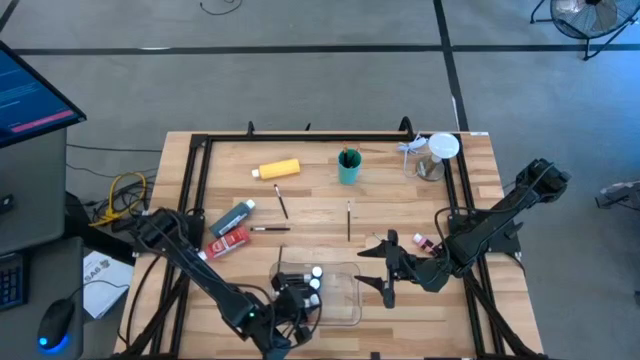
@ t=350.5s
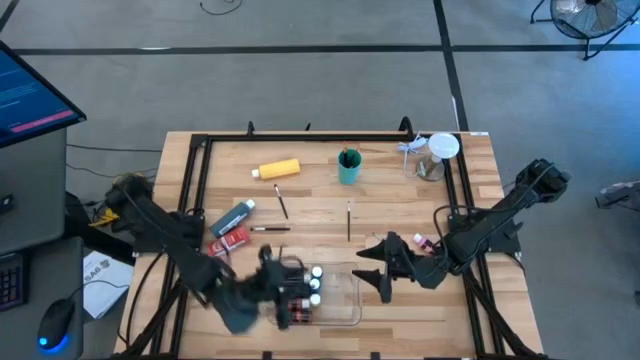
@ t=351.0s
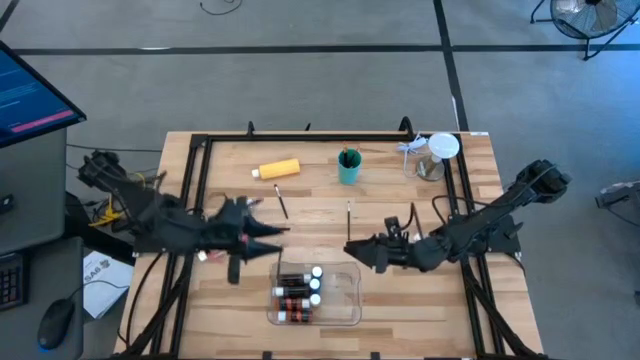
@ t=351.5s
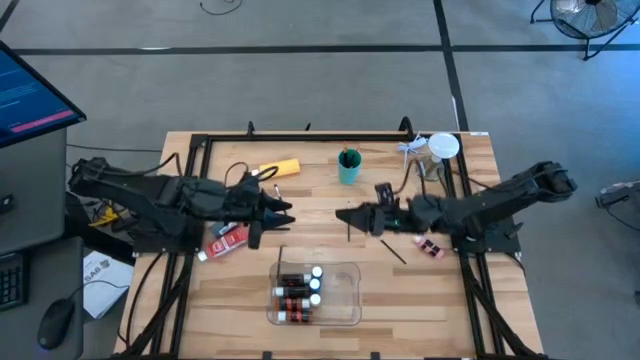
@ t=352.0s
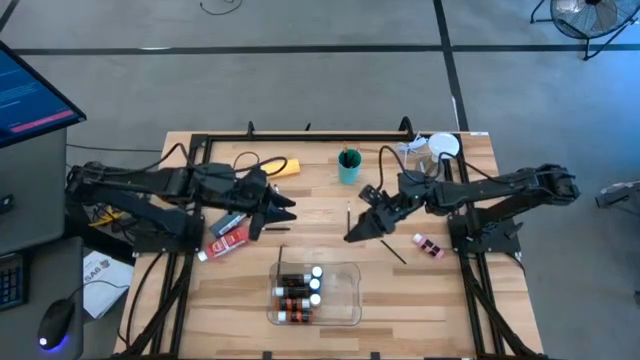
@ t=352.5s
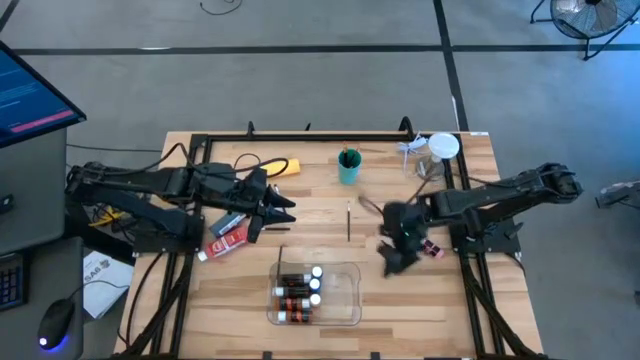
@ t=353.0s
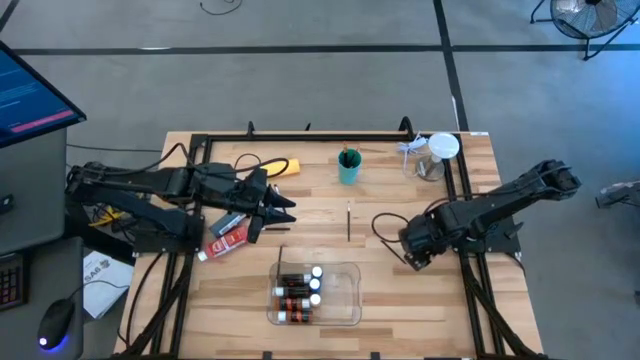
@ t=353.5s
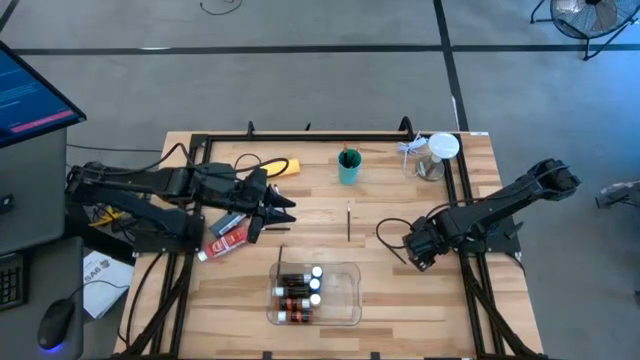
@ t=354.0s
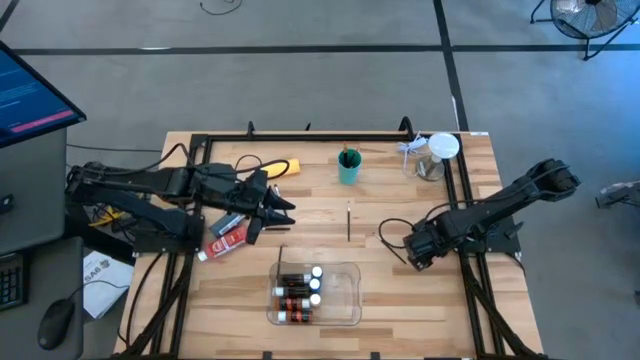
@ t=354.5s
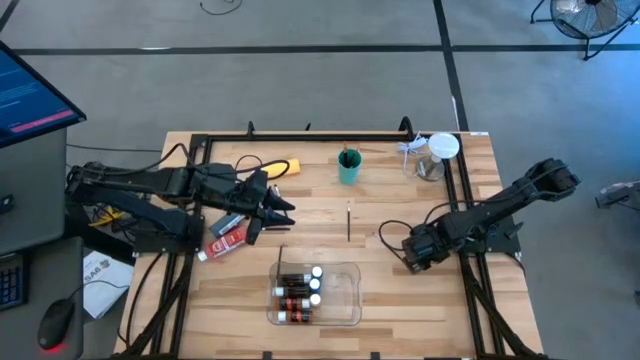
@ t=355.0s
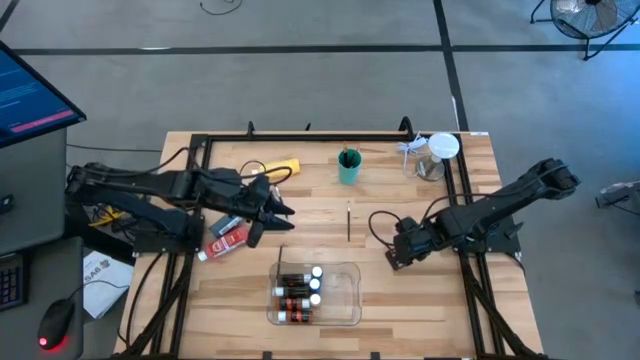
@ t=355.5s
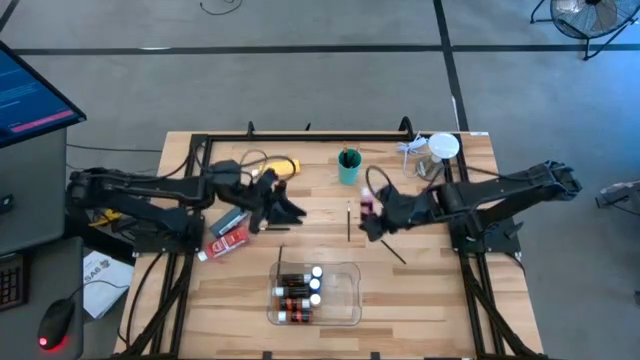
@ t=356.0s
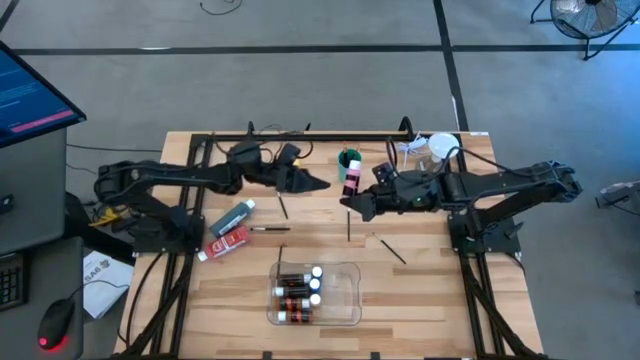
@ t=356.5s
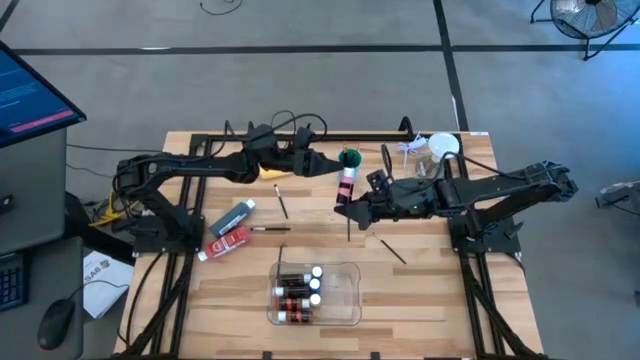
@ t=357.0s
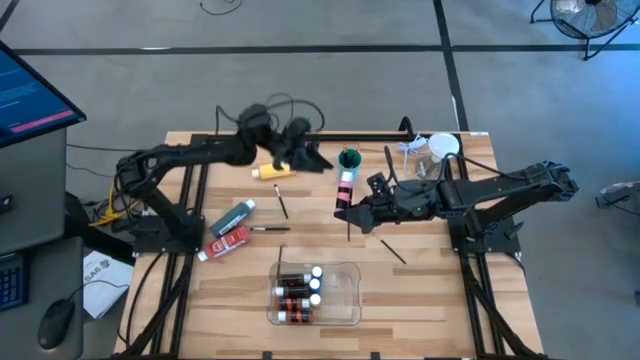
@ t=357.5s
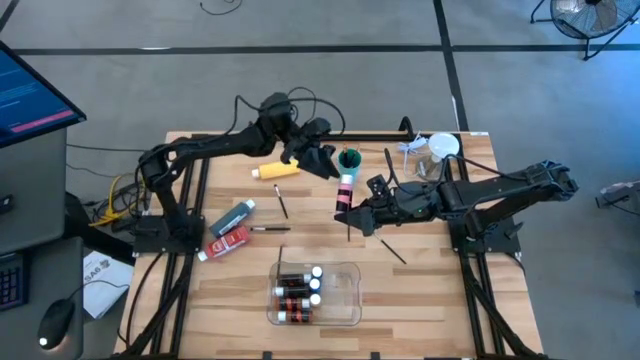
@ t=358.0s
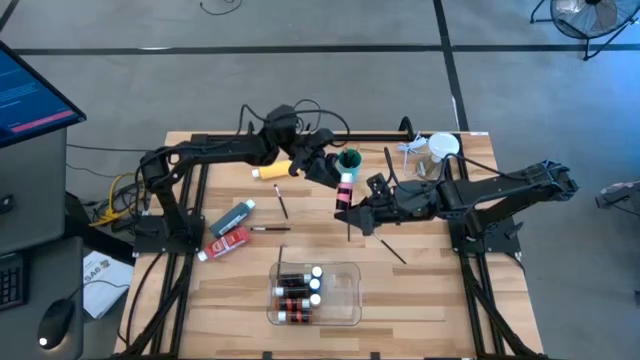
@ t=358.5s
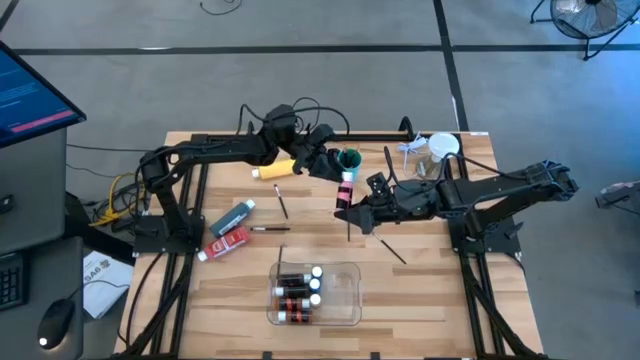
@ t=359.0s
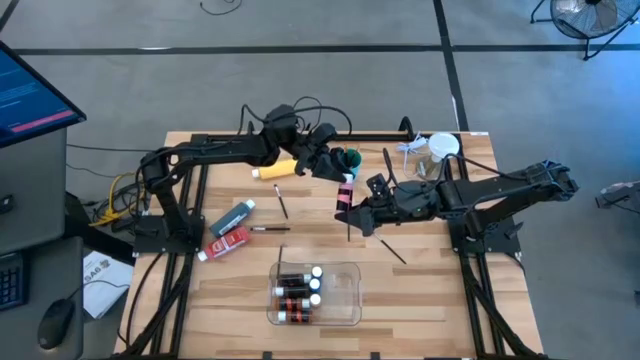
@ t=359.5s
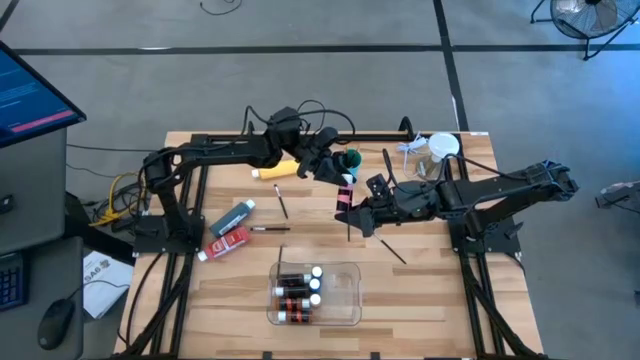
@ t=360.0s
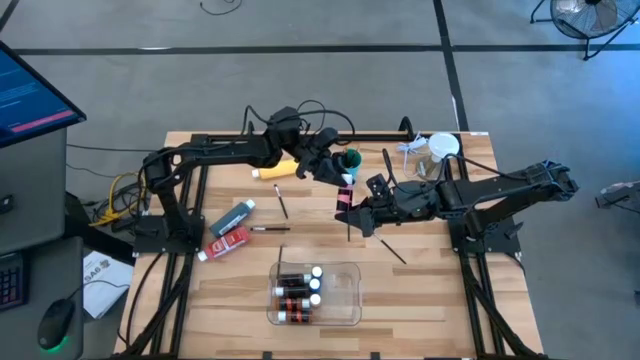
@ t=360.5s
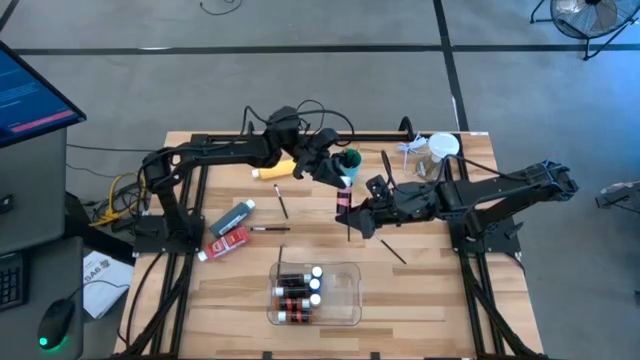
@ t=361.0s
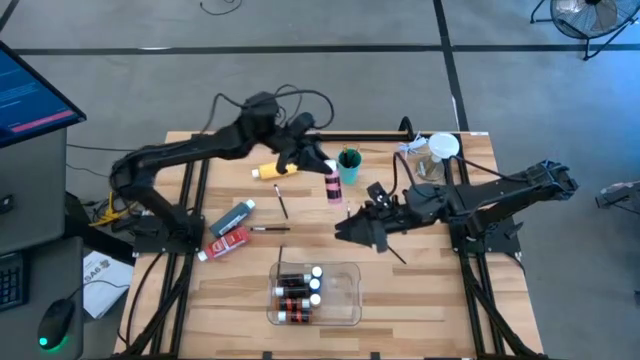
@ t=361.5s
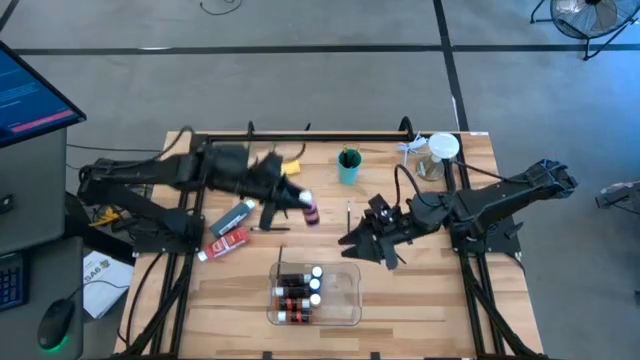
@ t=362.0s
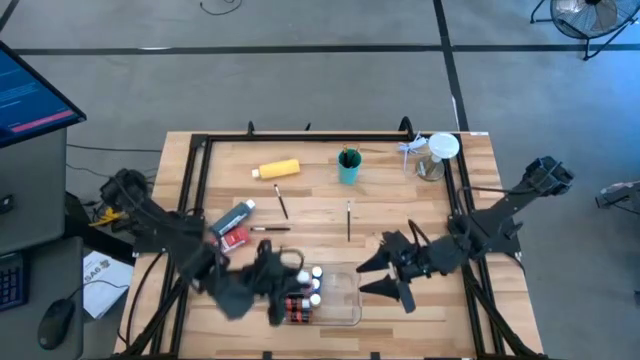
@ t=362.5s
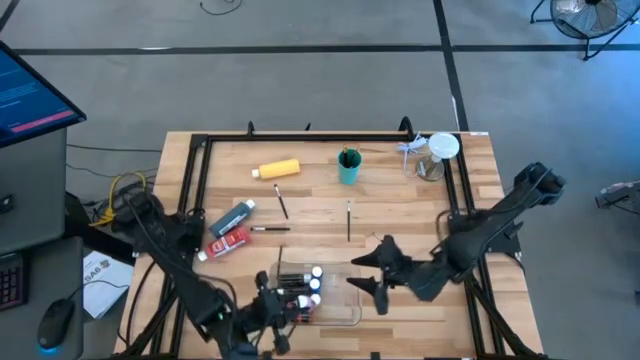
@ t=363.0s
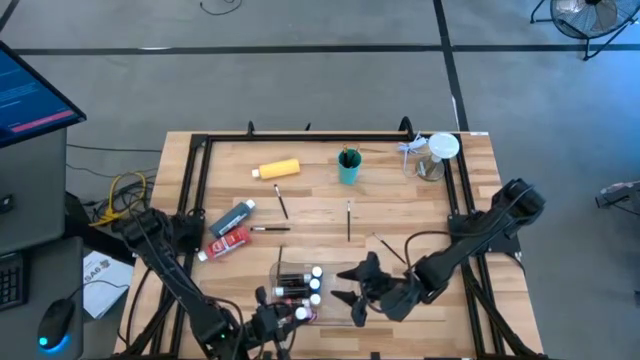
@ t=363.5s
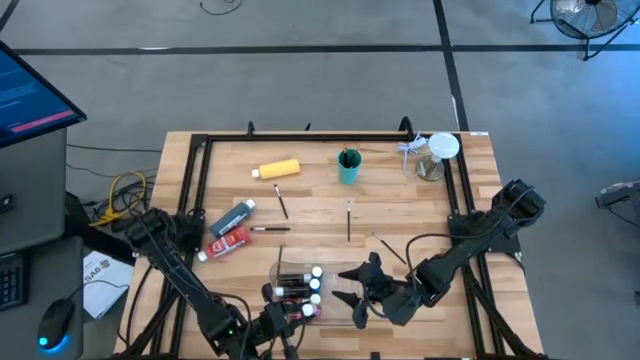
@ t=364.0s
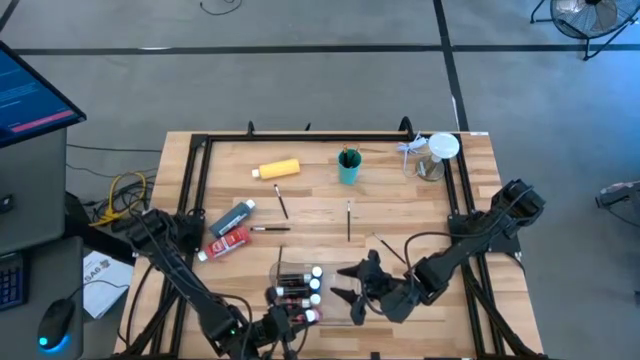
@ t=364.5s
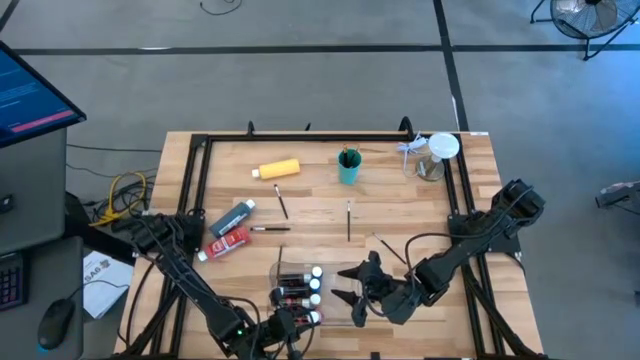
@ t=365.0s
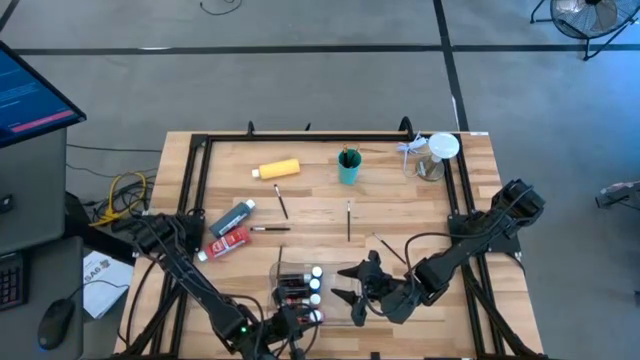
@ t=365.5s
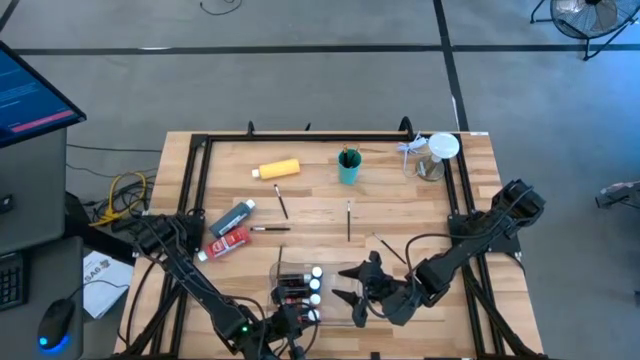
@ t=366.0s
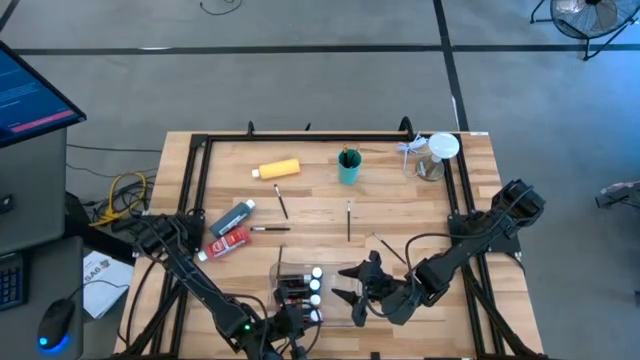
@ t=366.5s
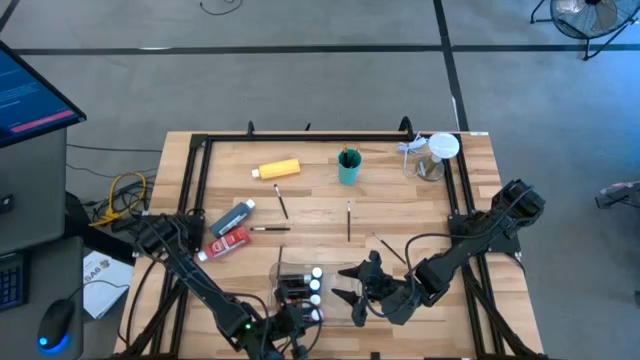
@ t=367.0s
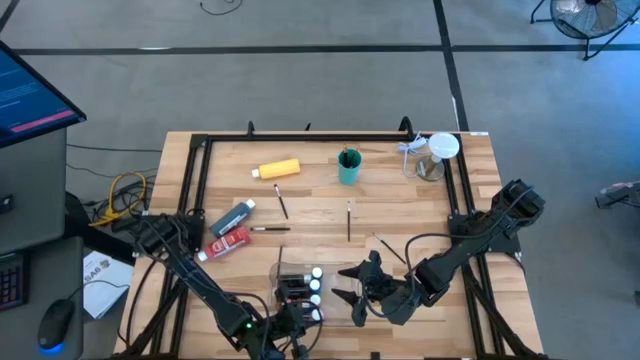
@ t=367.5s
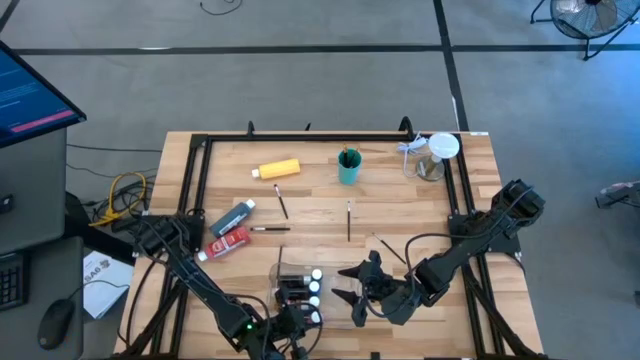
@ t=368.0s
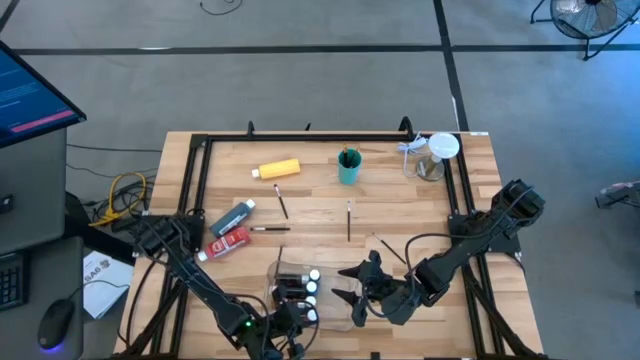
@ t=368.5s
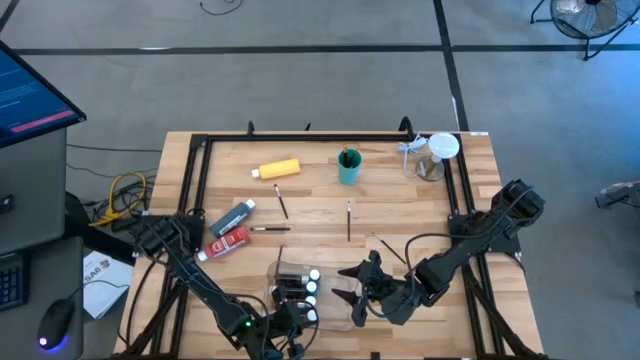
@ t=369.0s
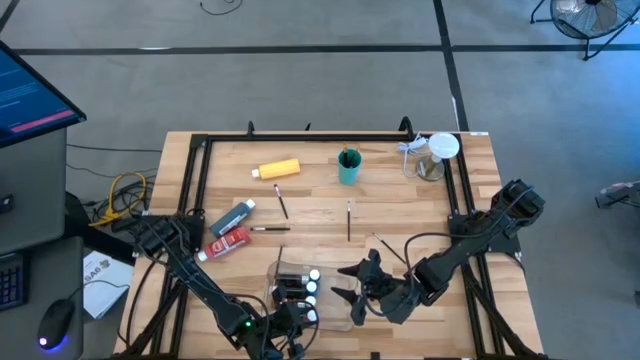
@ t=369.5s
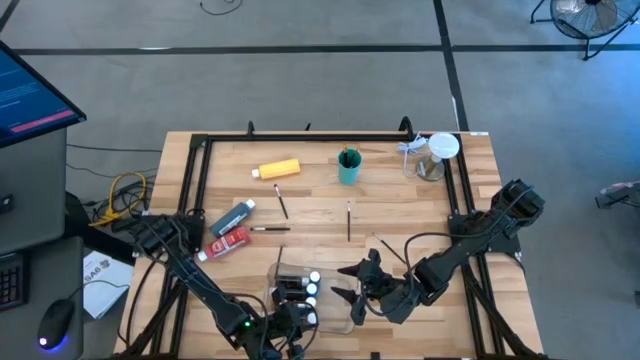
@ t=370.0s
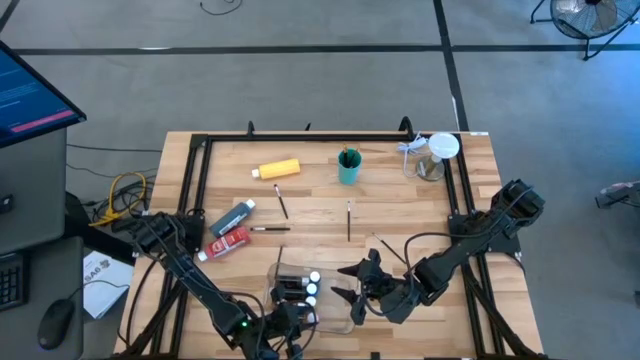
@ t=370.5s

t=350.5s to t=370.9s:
Task: Pick & Place Paint Supplies
Put the pink paint bottle into the transparent bin
